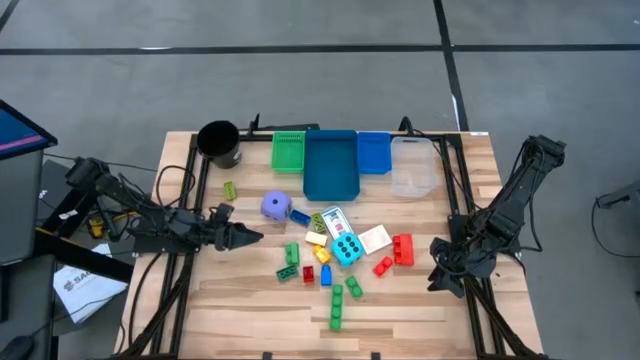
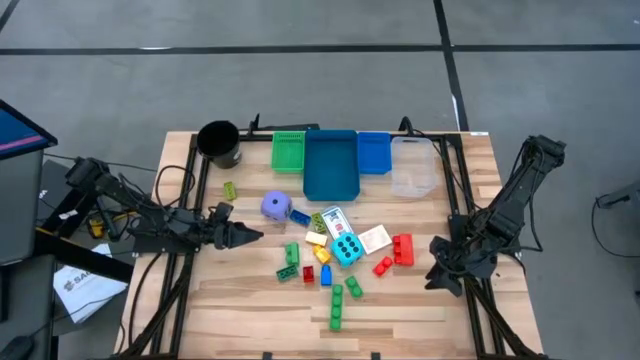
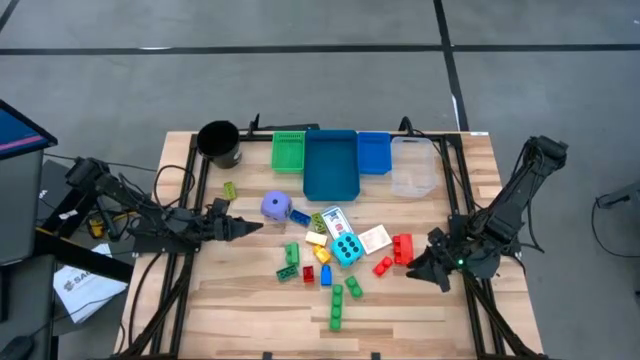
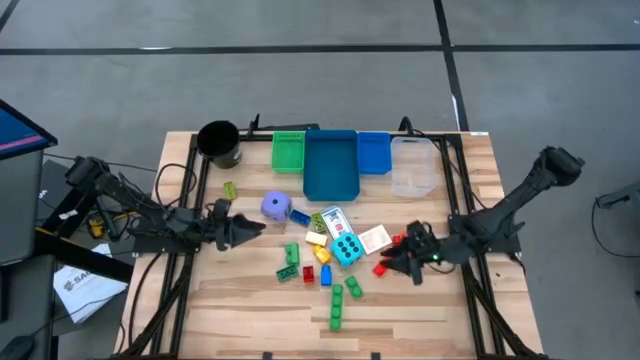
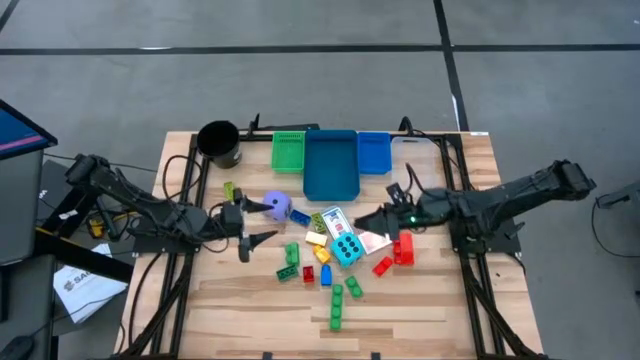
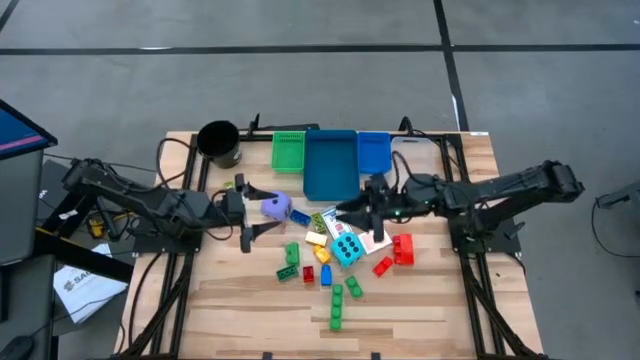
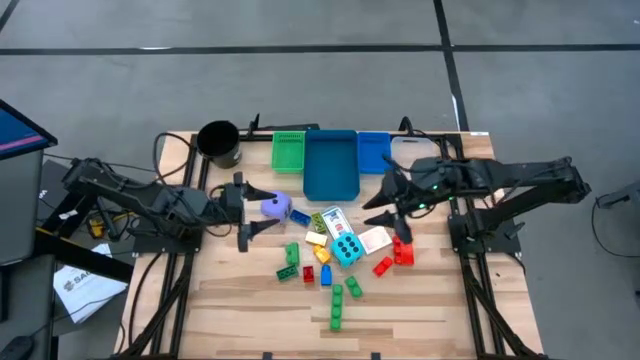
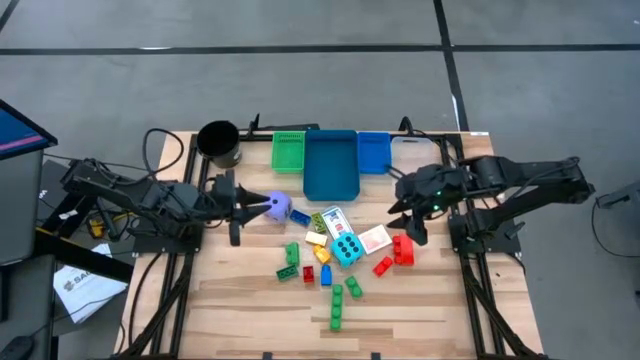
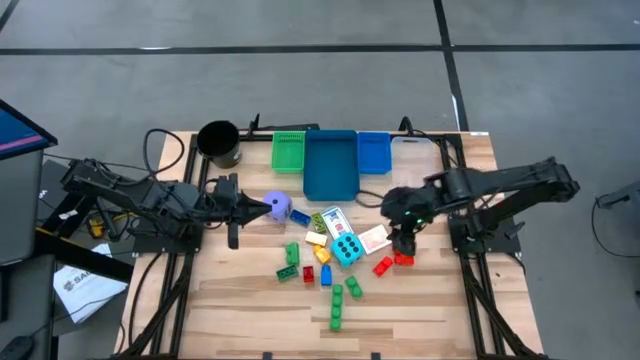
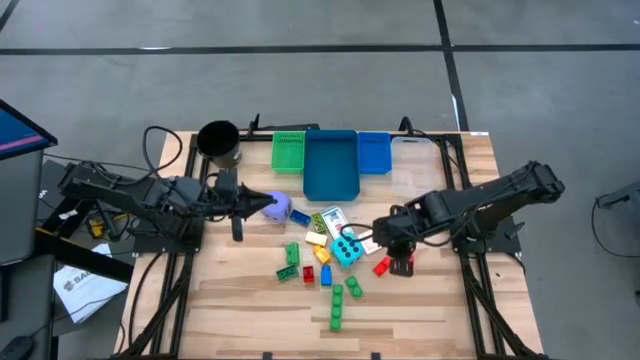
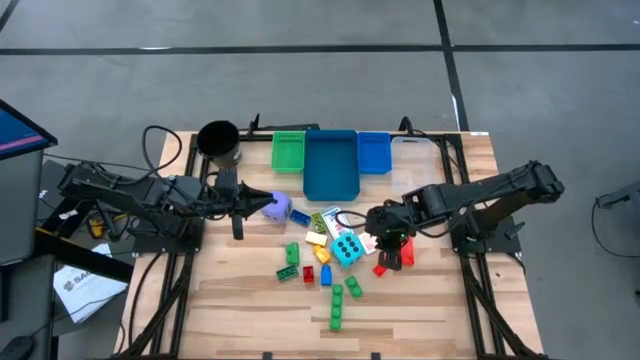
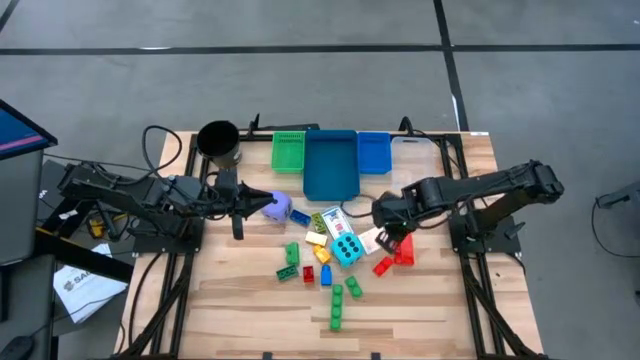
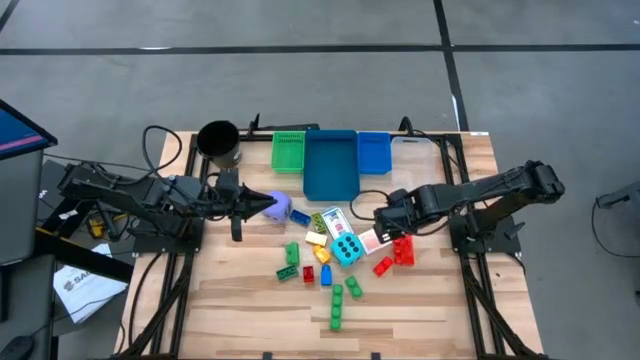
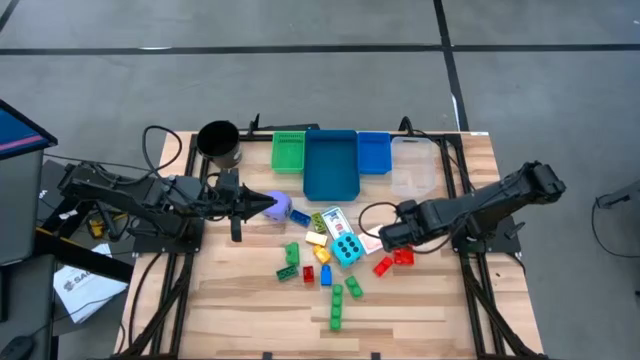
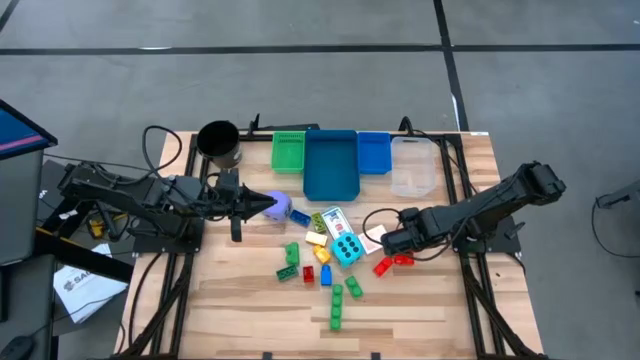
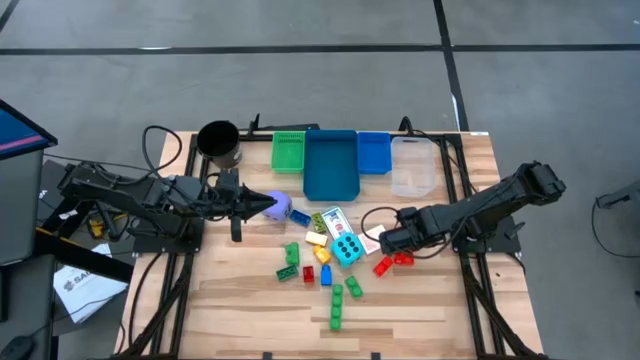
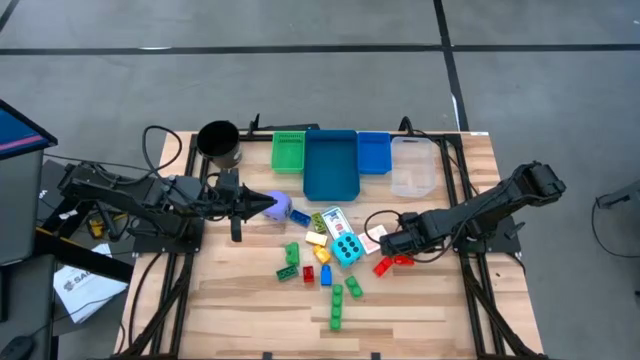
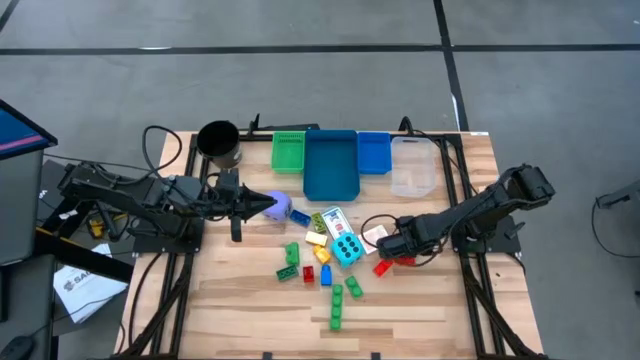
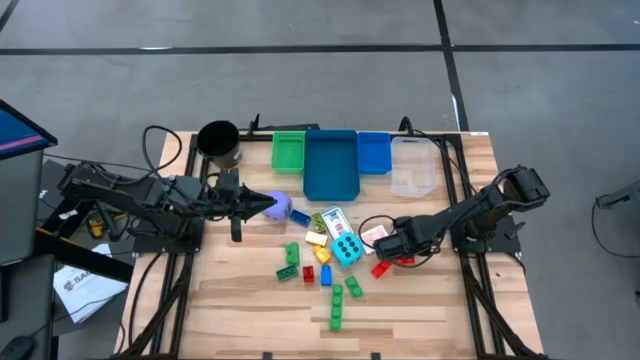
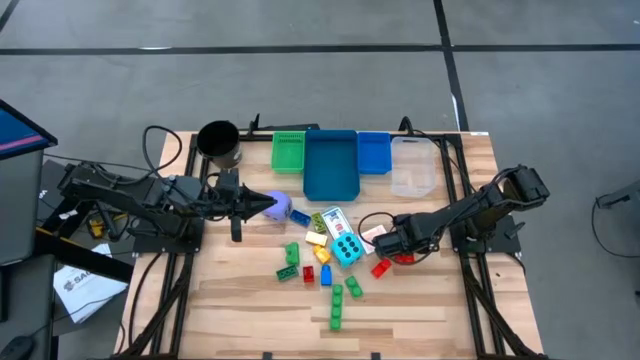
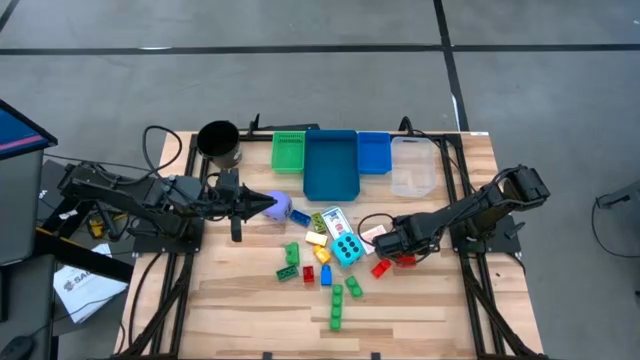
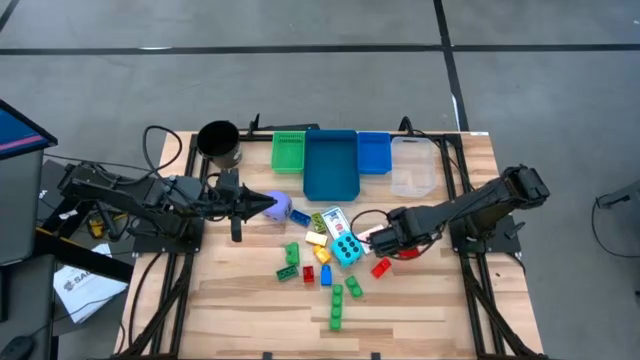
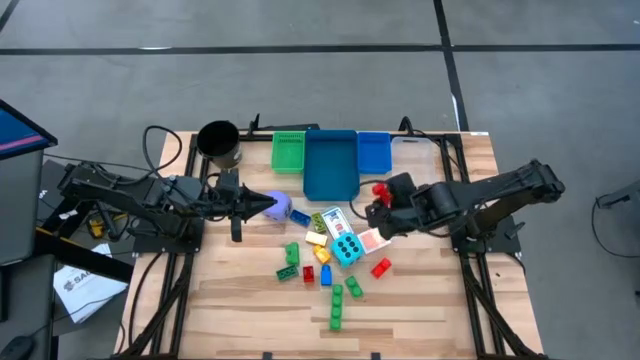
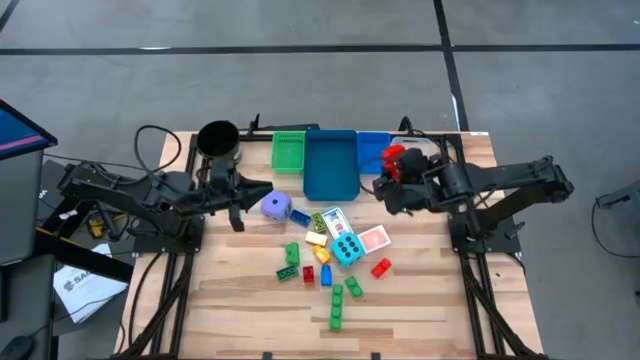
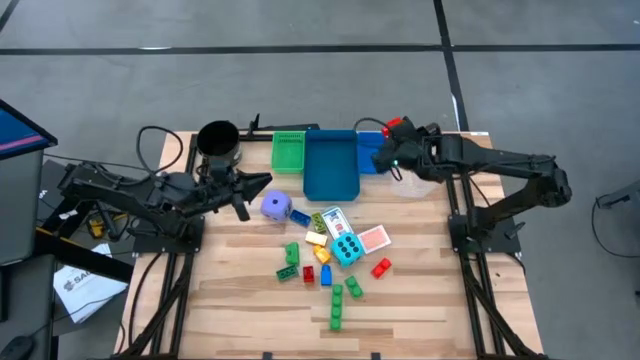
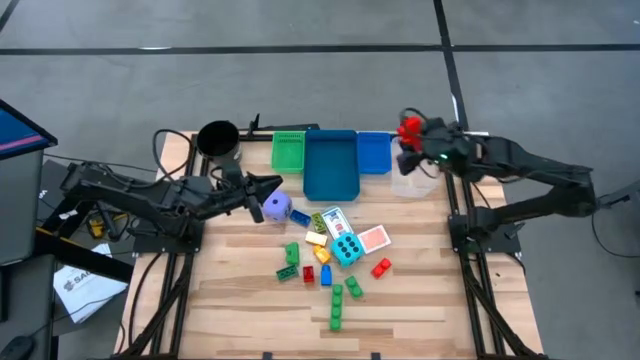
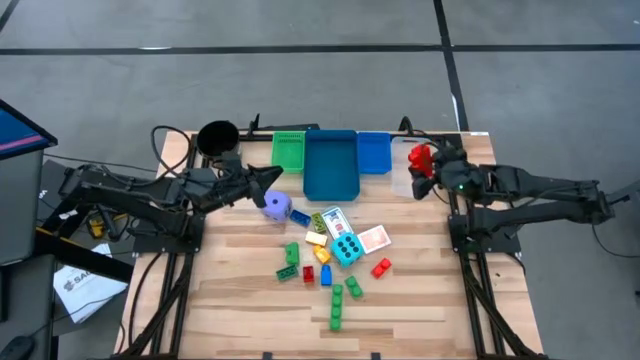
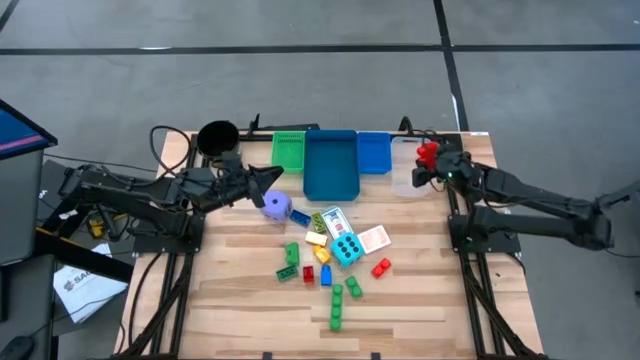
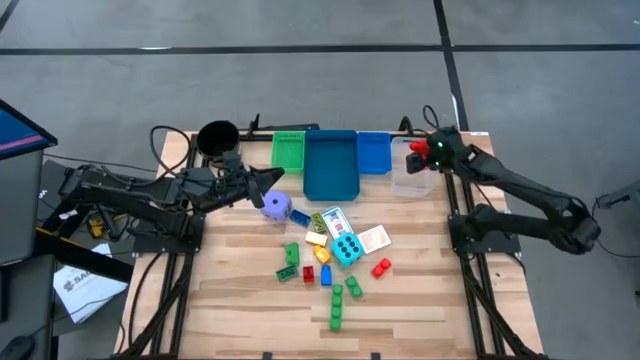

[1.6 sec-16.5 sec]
Task: Pick & Place Toys
Put the large red game piece into the transparent bin

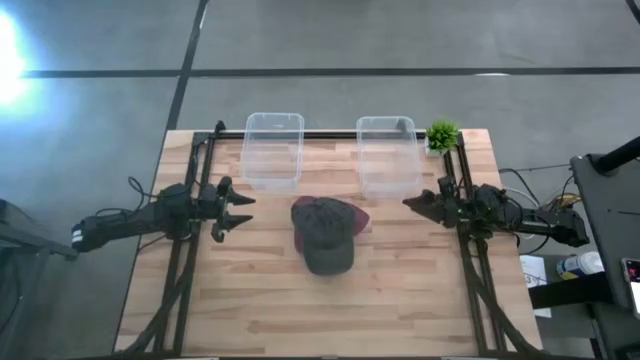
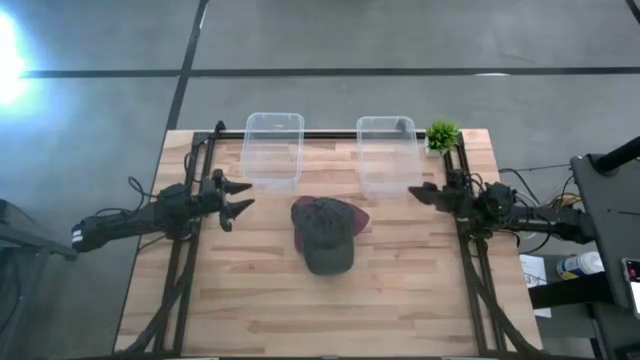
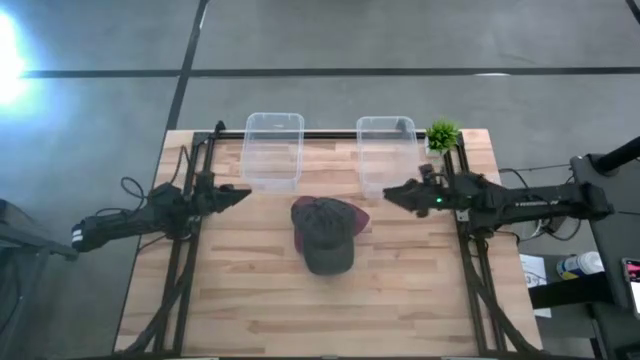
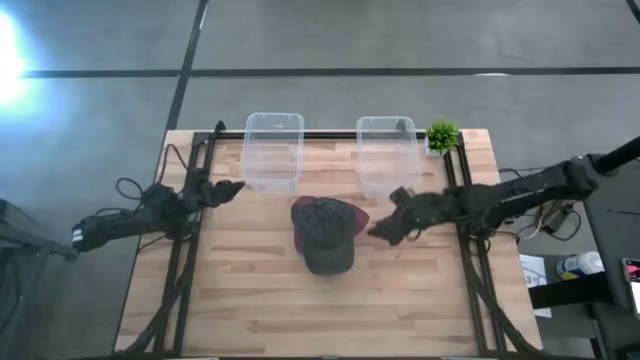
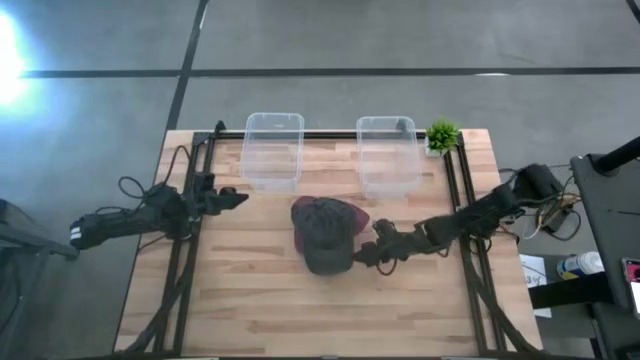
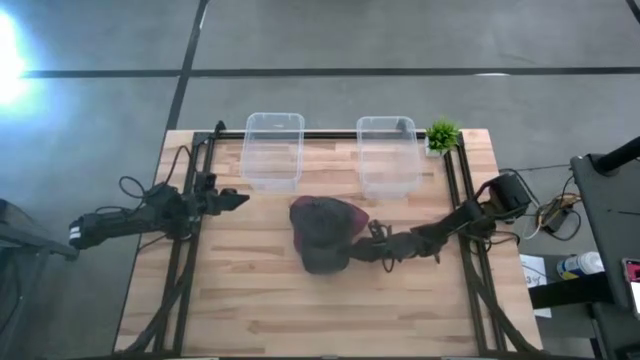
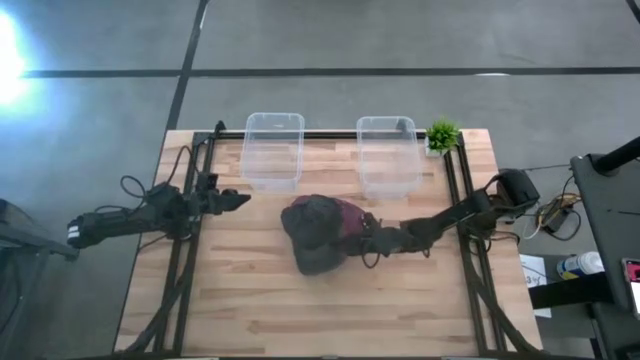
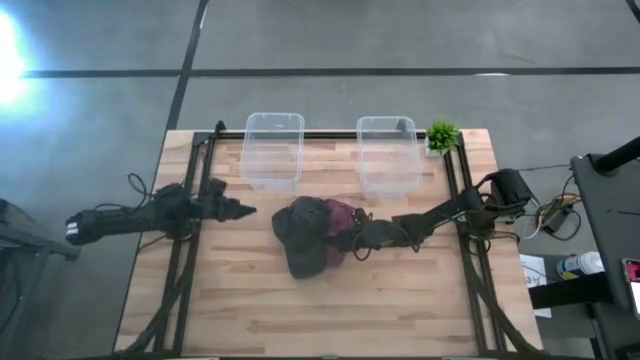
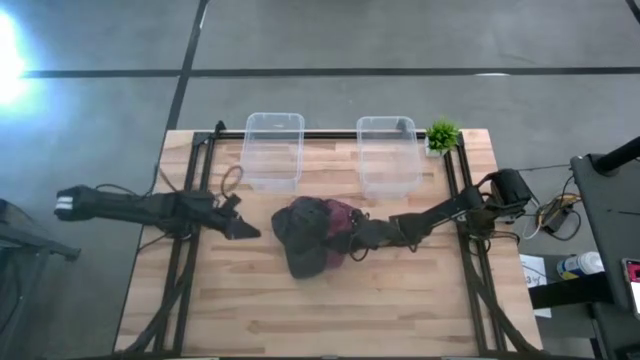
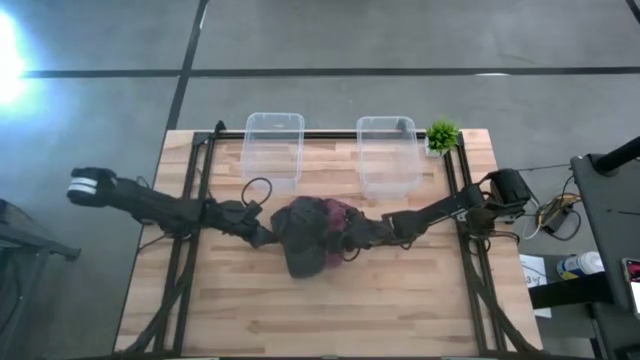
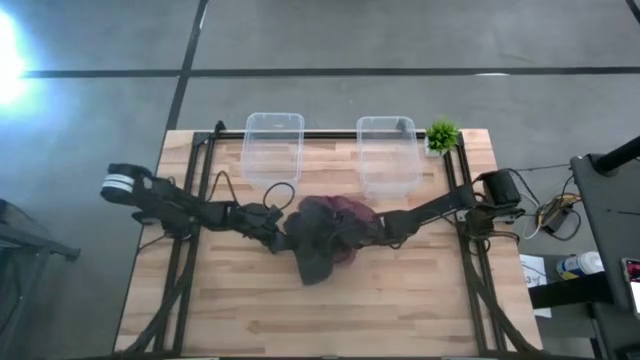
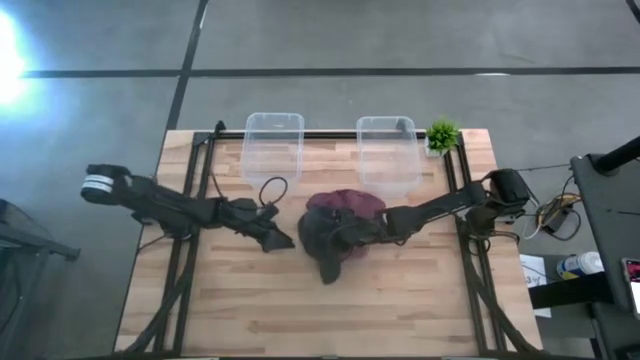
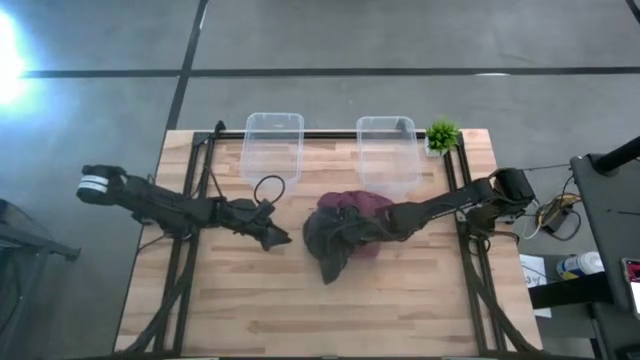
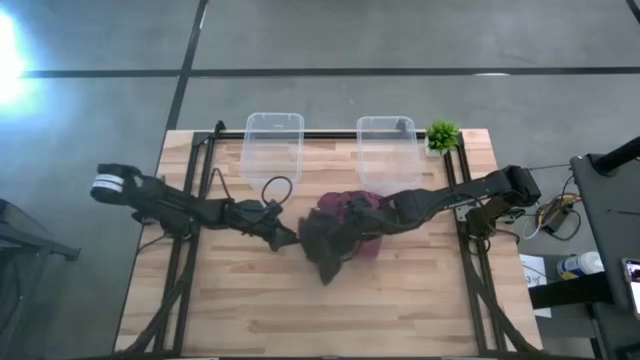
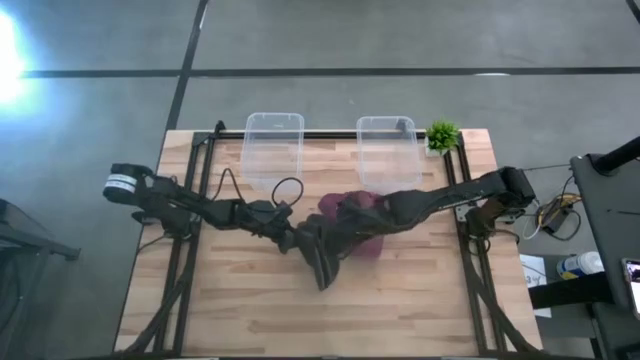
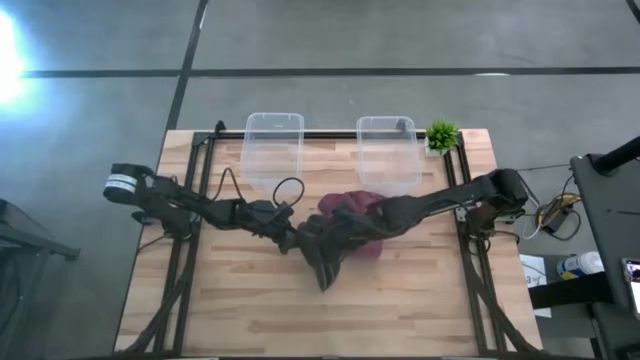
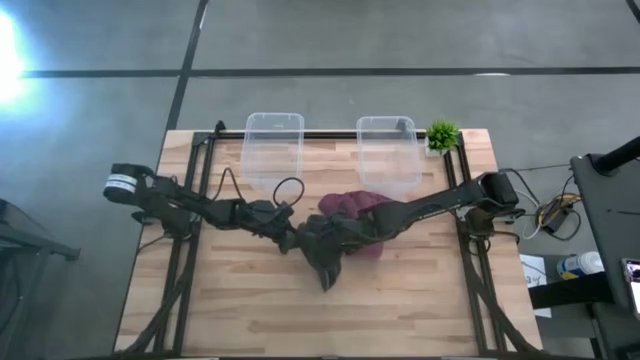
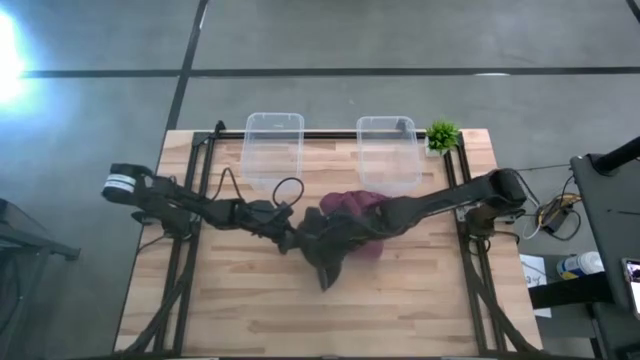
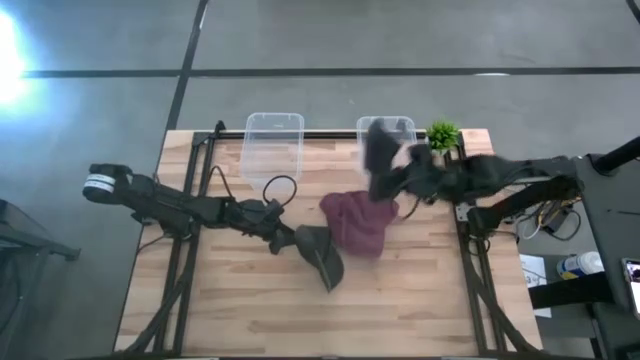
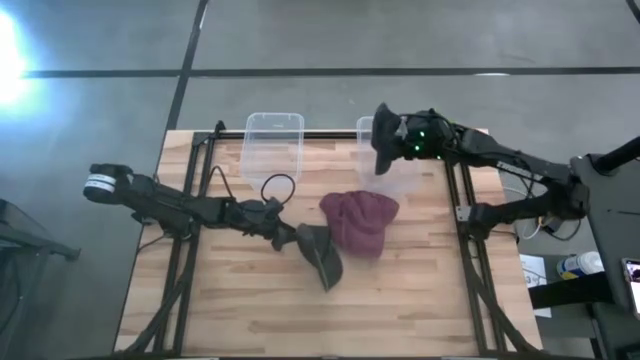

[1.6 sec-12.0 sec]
Task: Pick & Place hat
Put the top black cap into the right transparent bin
